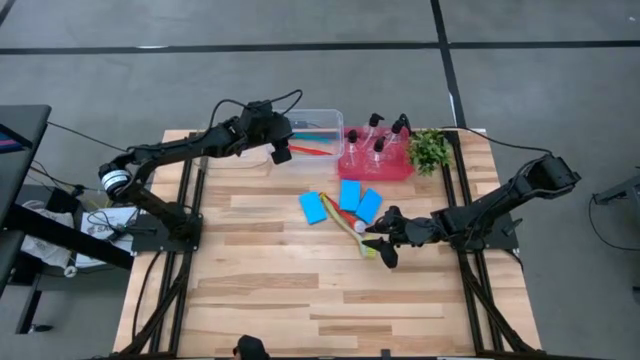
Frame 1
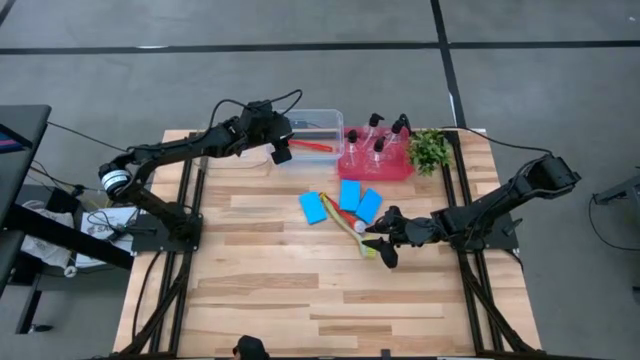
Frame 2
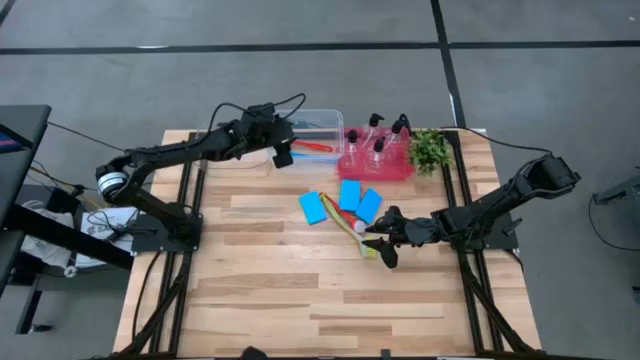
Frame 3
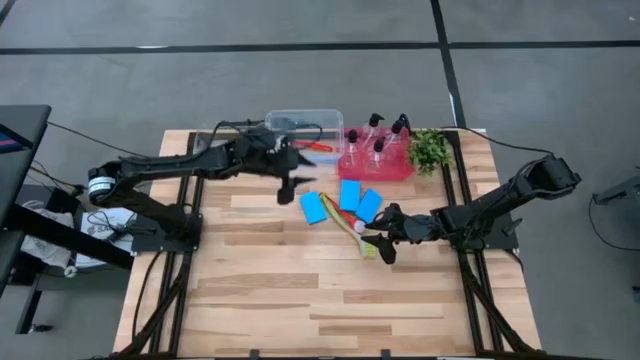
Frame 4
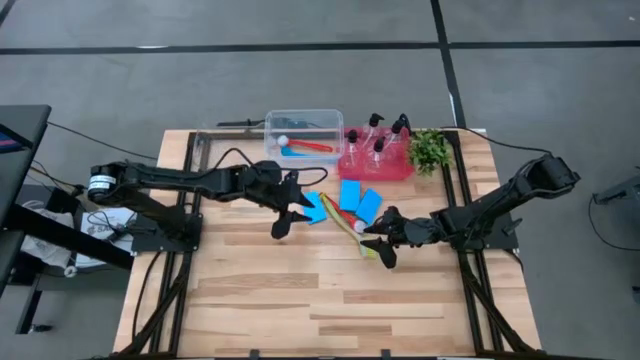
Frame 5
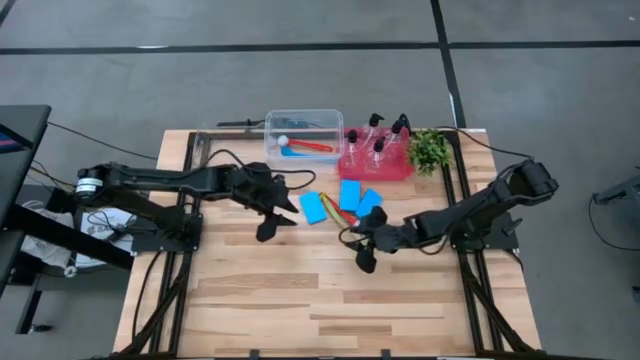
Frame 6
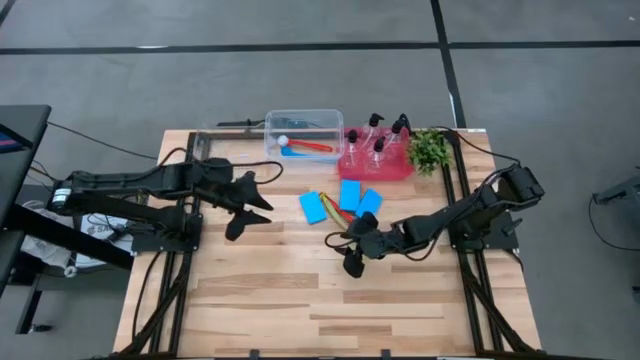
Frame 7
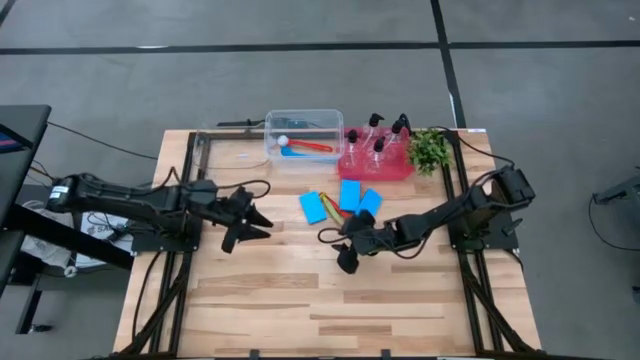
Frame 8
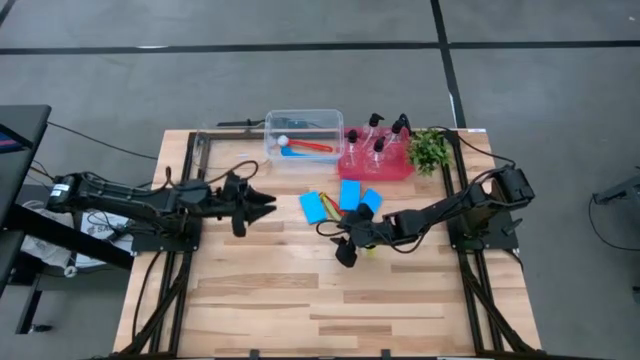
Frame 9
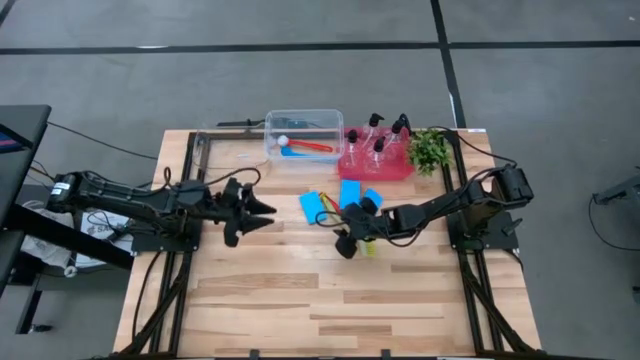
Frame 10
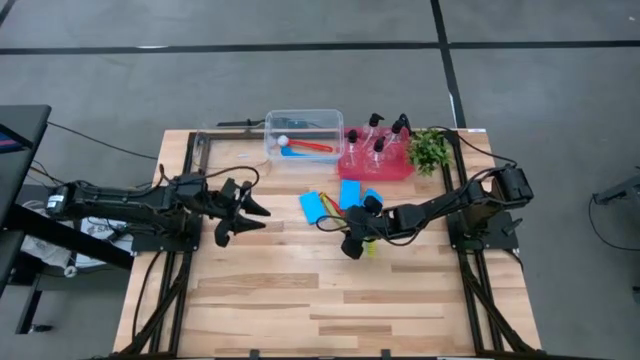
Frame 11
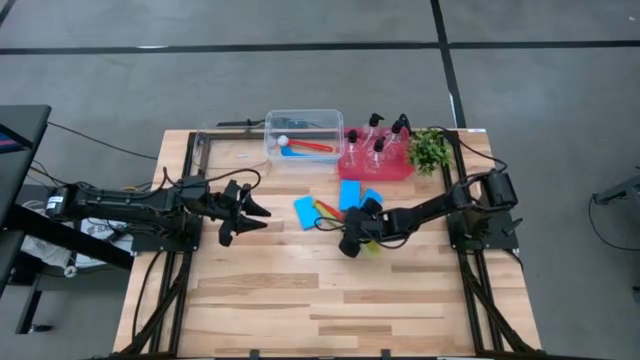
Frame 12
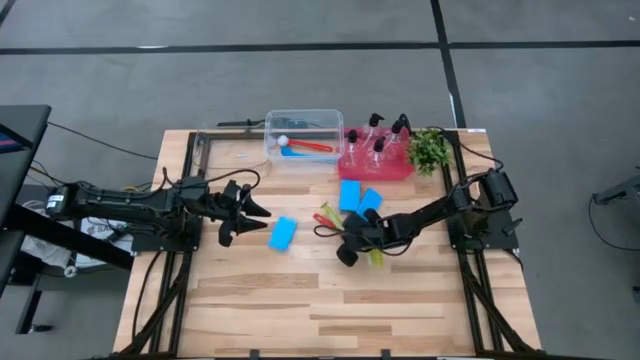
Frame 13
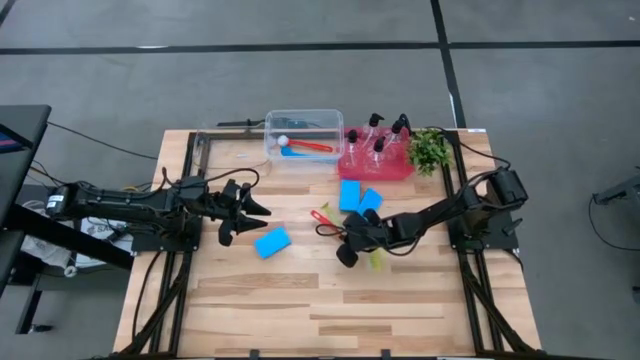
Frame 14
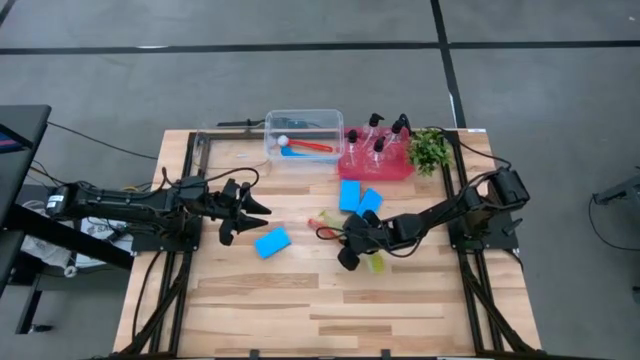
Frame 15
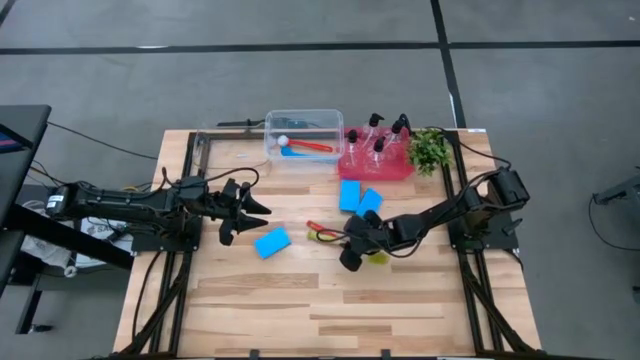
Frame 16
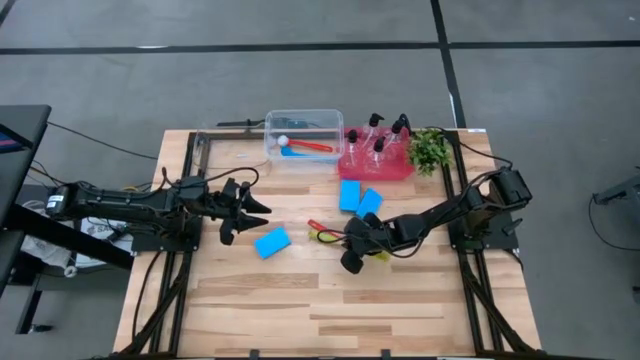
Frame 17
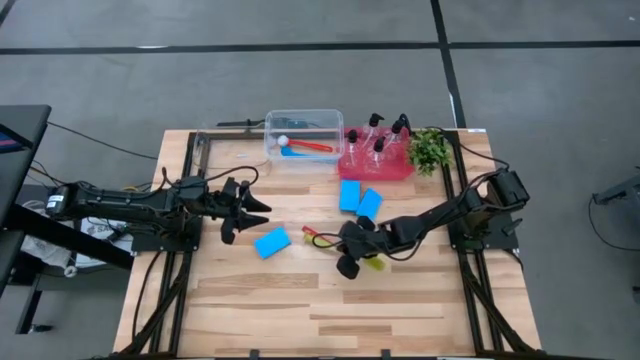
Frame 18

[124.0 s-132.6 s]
Task: Pick & Place Kitchen Sink Supplies
Put the light yellow toilet brush into the white bin

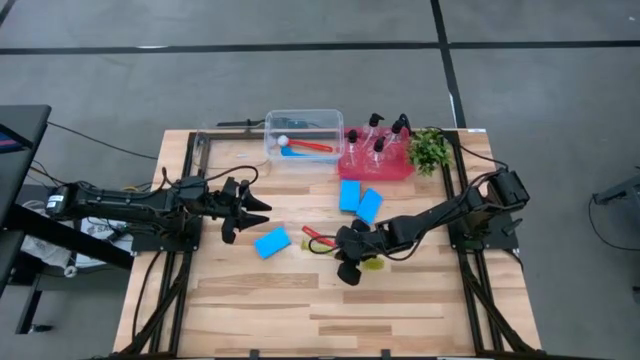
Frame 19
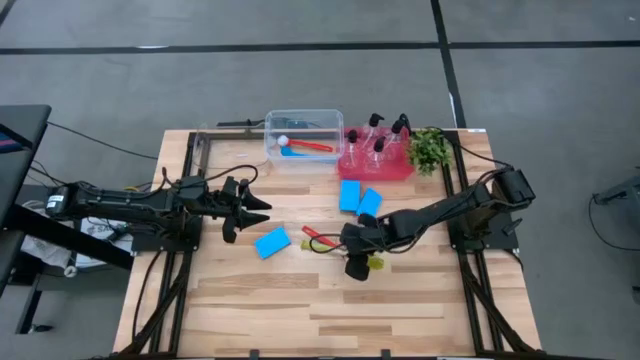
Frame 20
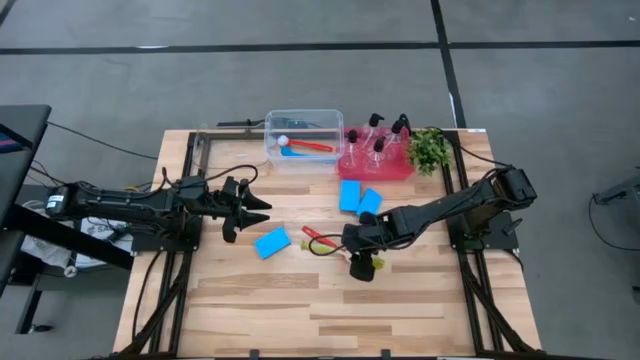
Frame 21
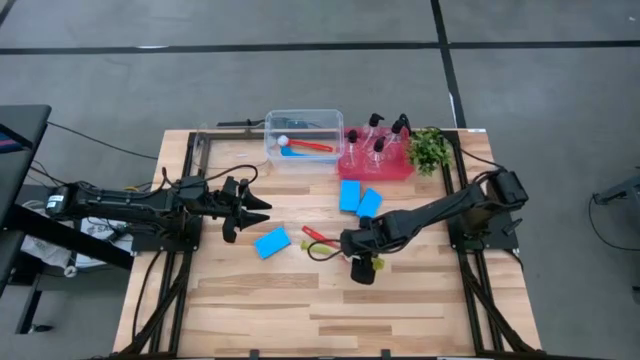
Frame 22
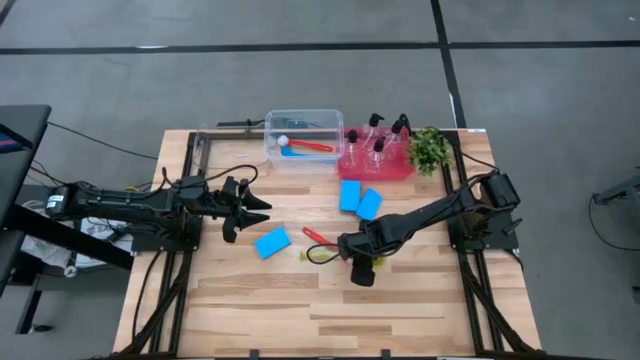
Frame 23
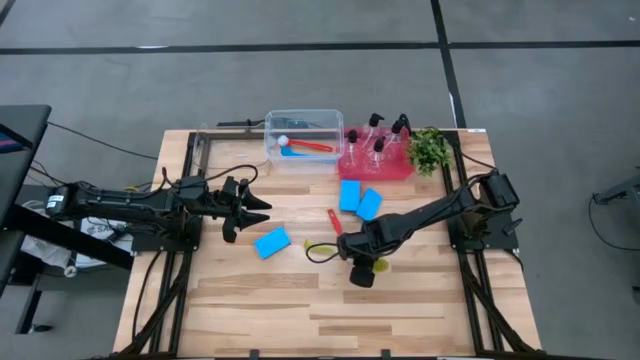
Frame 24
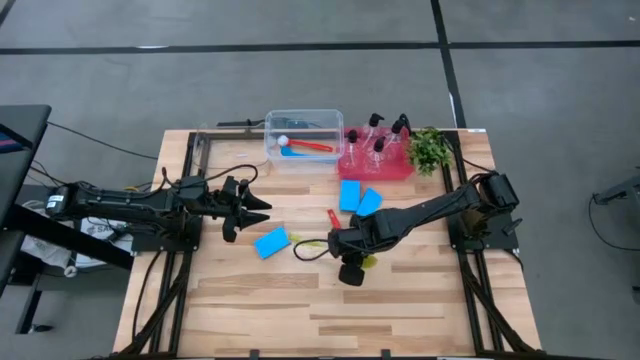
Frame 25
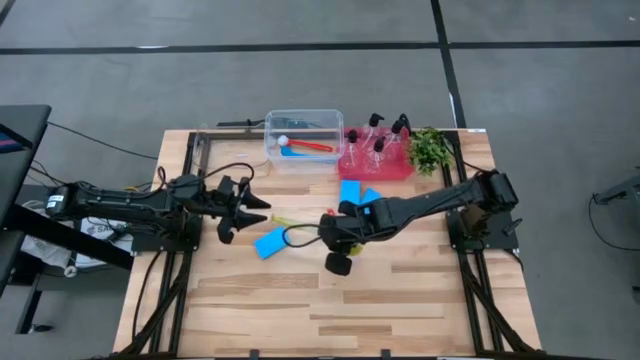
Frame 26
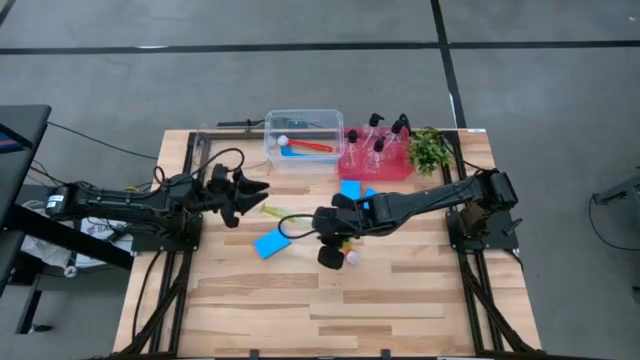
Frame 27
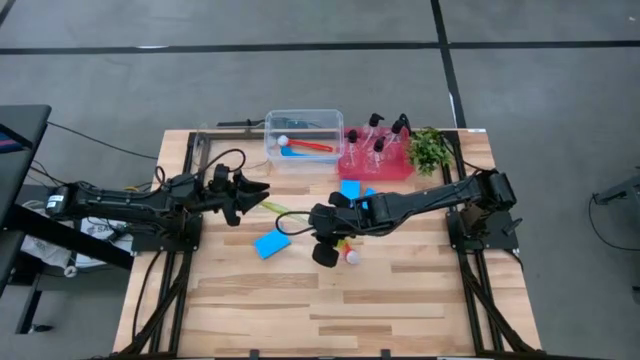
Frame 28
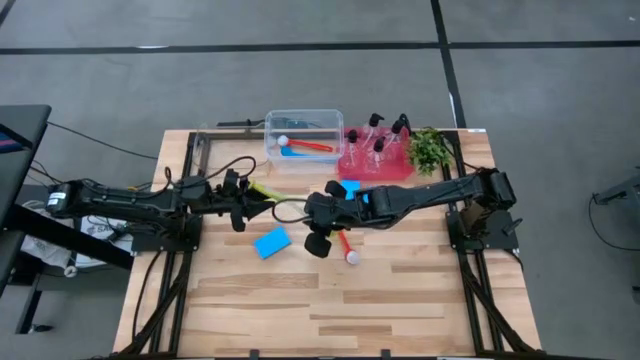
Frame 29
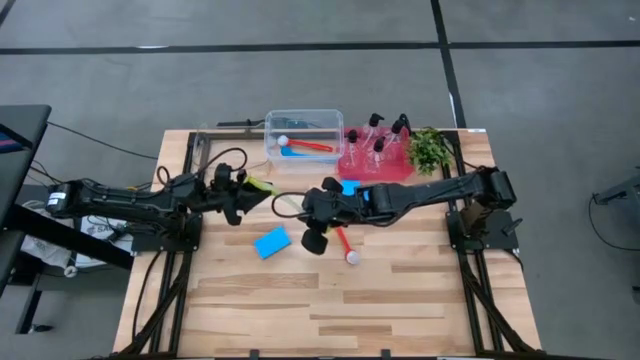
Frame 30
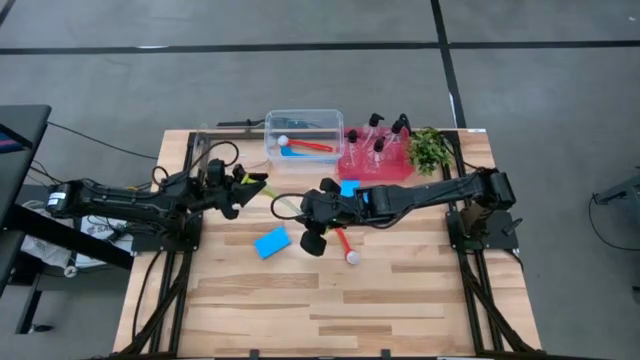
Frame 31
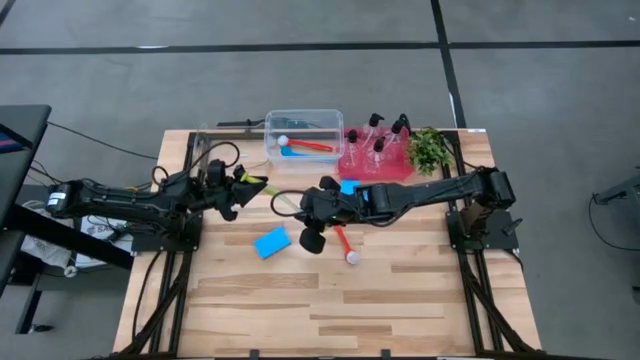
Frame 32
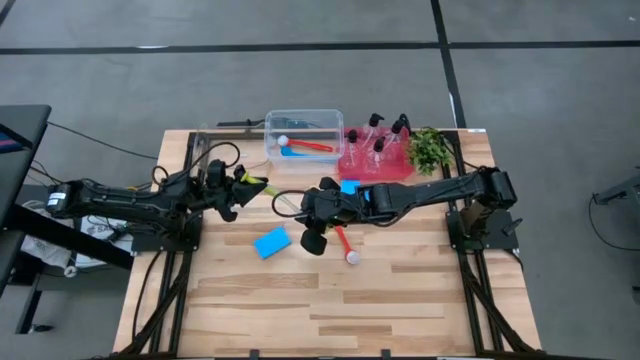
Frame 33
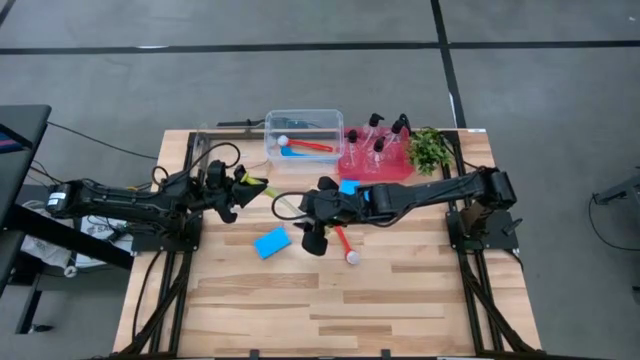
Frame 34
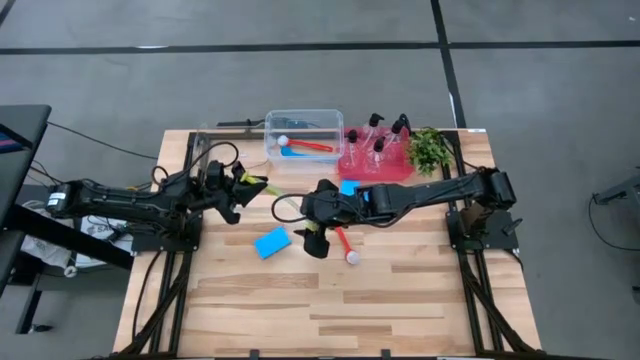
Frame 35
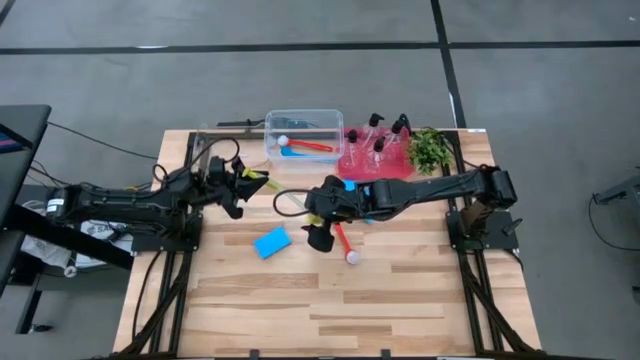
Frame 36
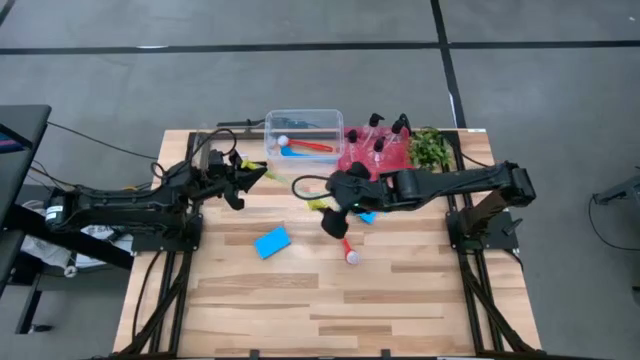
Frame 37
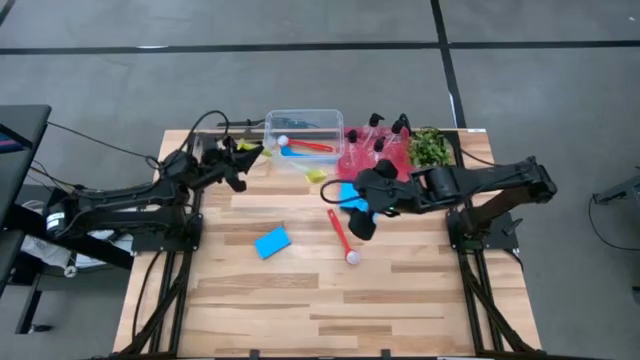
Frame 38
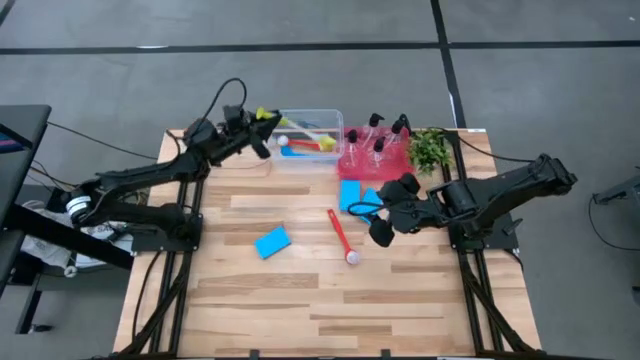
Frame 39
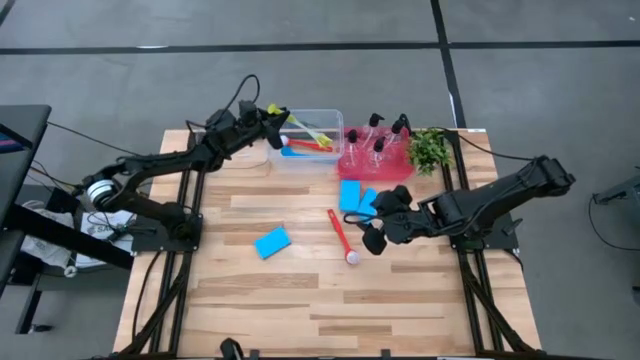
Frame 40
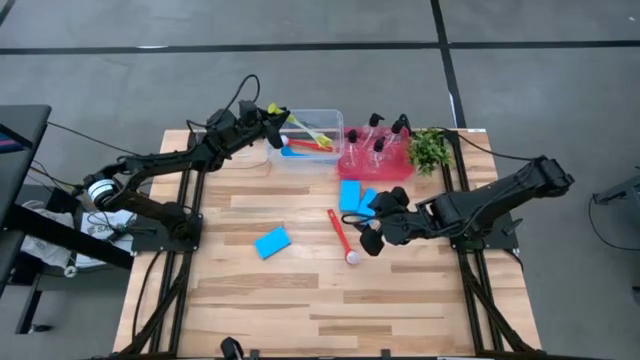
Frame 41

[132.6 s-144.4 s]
Put the yellow toilet brush into the white bin
